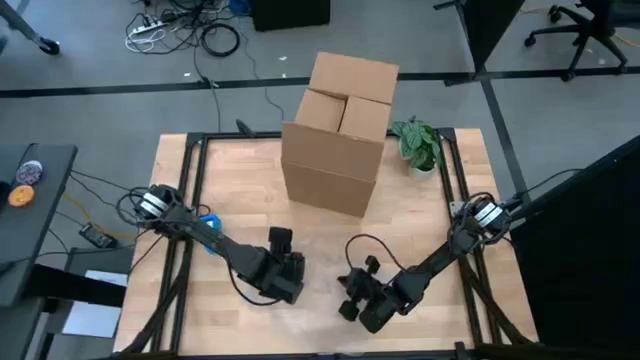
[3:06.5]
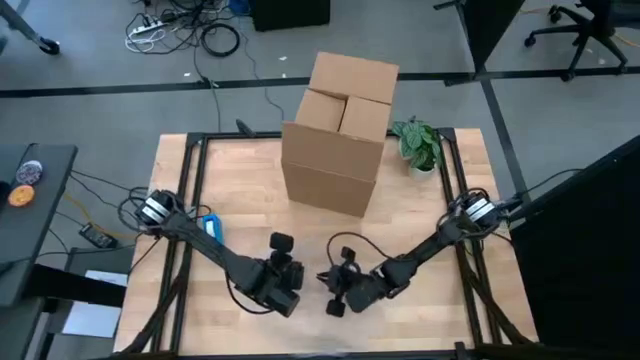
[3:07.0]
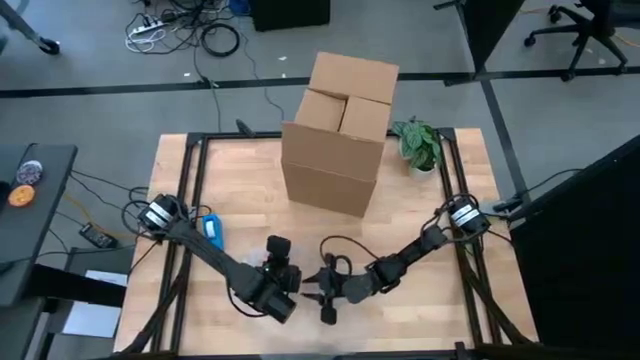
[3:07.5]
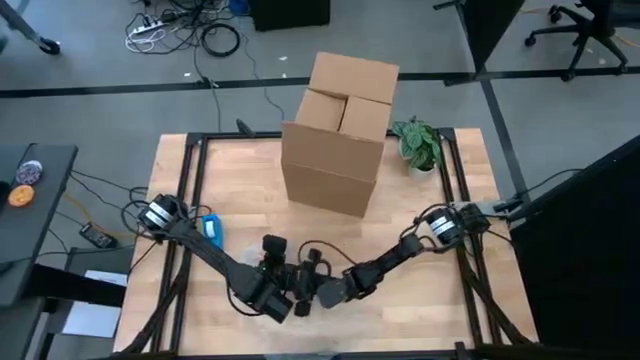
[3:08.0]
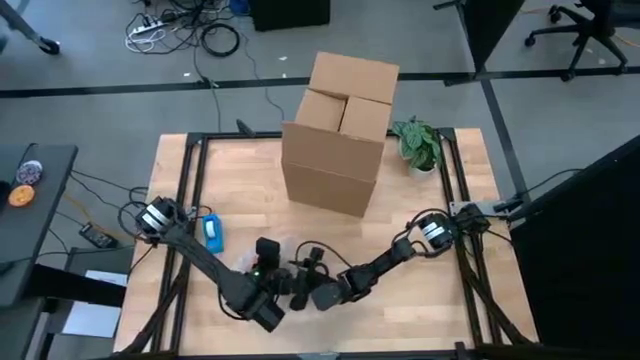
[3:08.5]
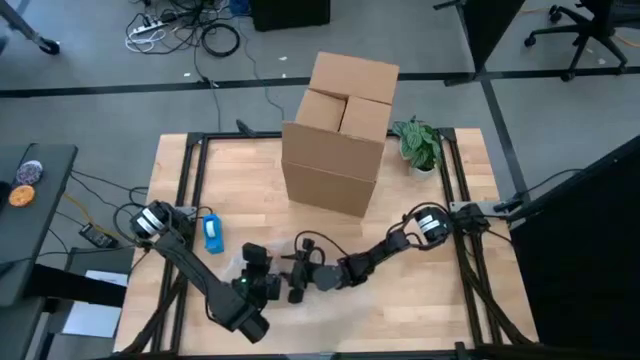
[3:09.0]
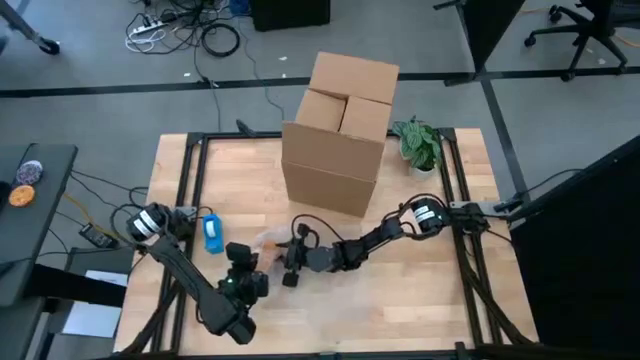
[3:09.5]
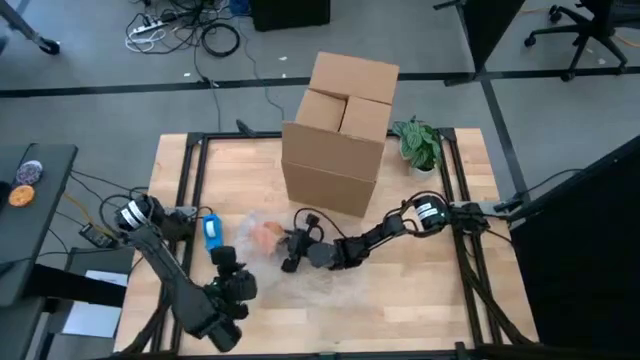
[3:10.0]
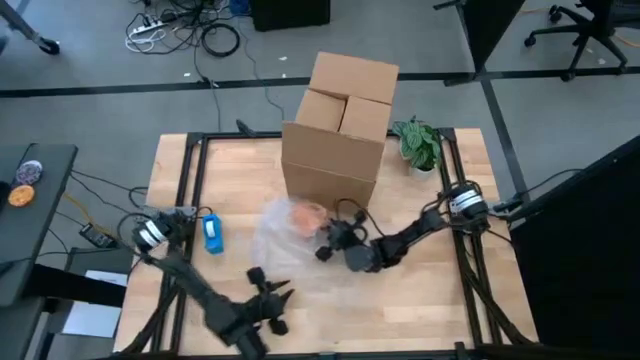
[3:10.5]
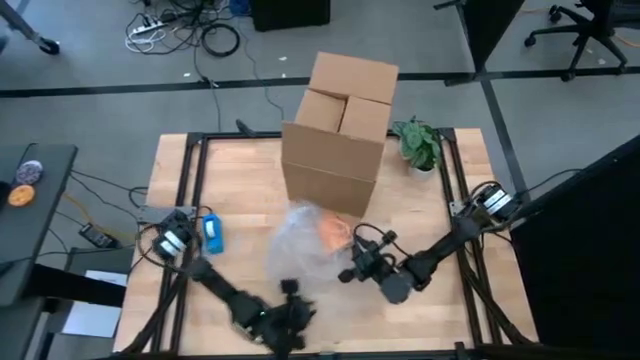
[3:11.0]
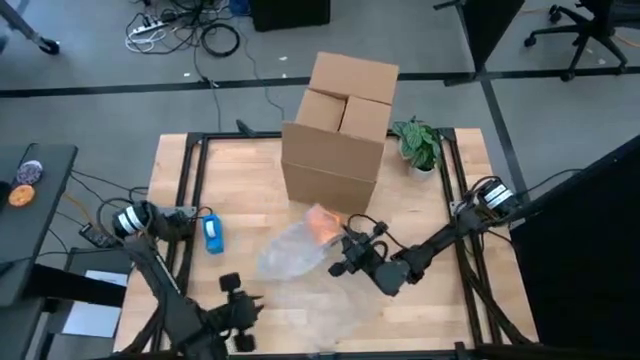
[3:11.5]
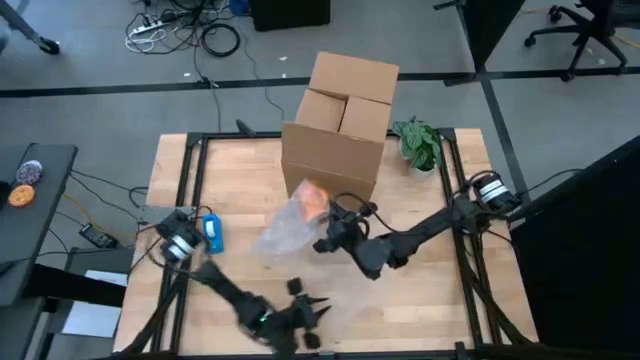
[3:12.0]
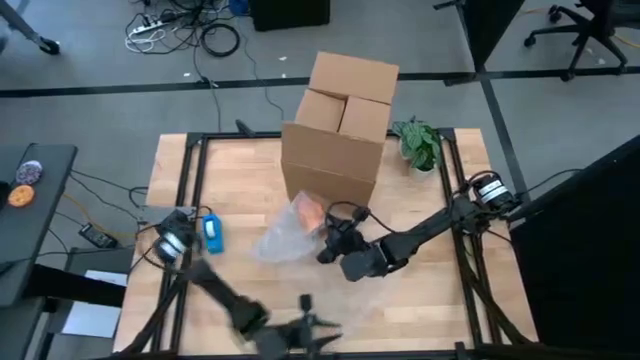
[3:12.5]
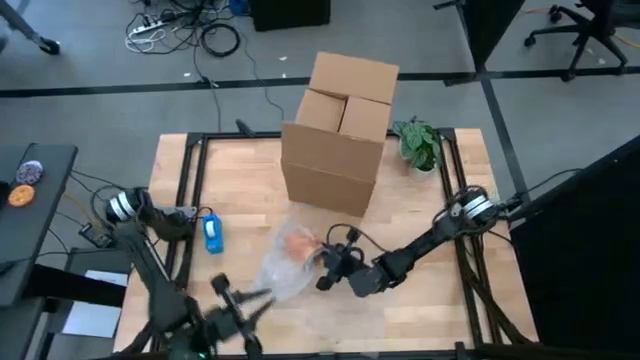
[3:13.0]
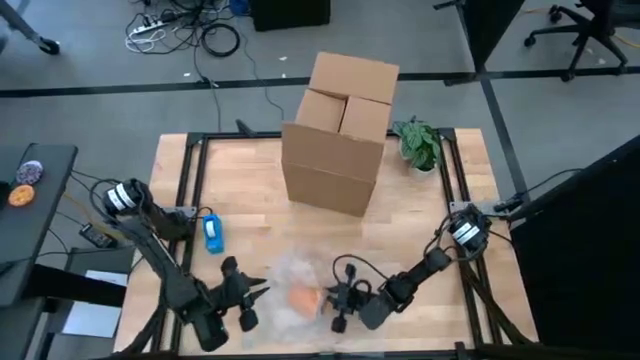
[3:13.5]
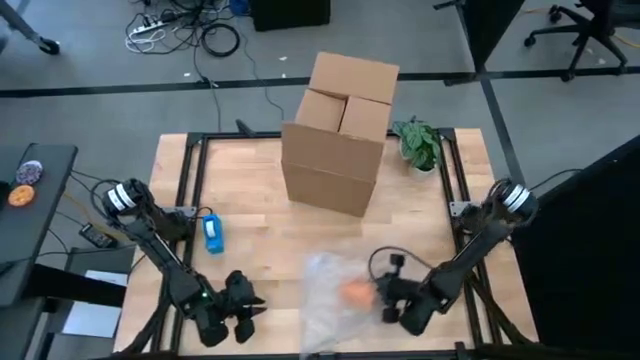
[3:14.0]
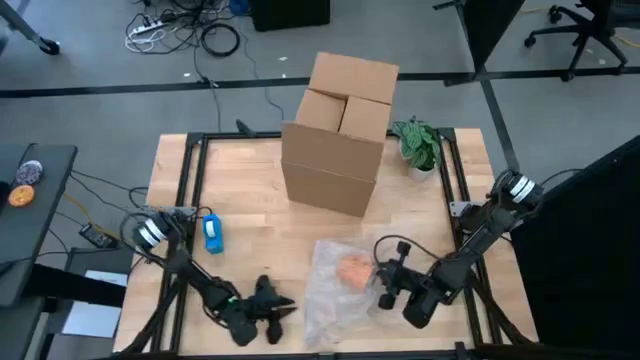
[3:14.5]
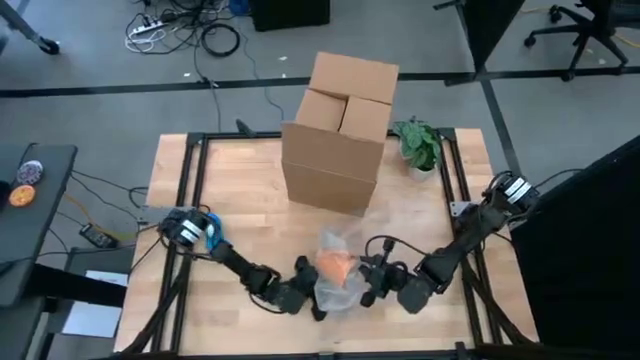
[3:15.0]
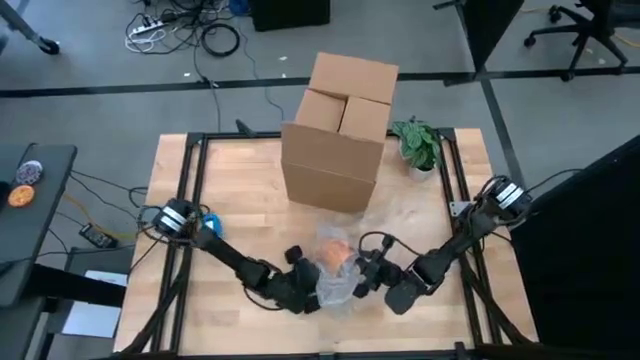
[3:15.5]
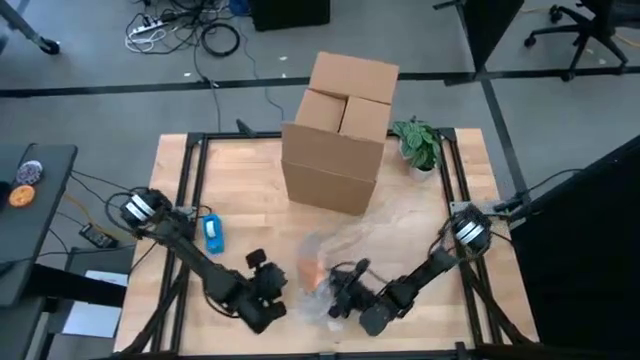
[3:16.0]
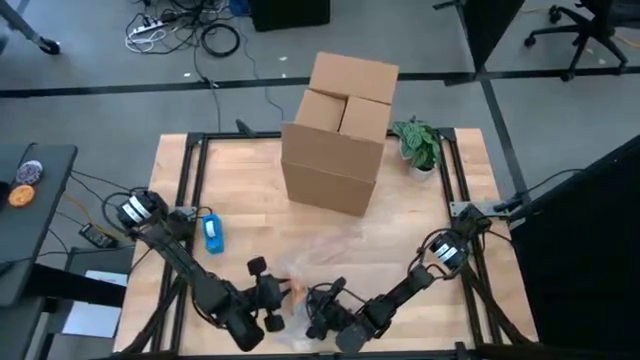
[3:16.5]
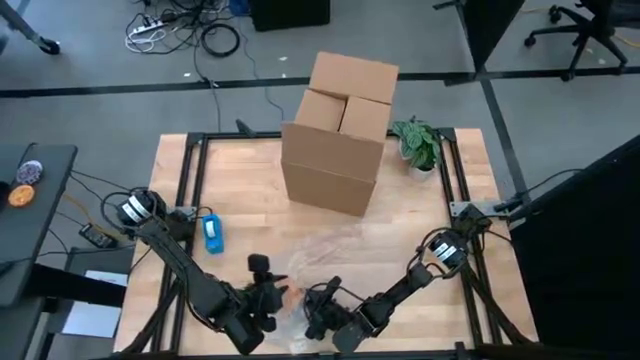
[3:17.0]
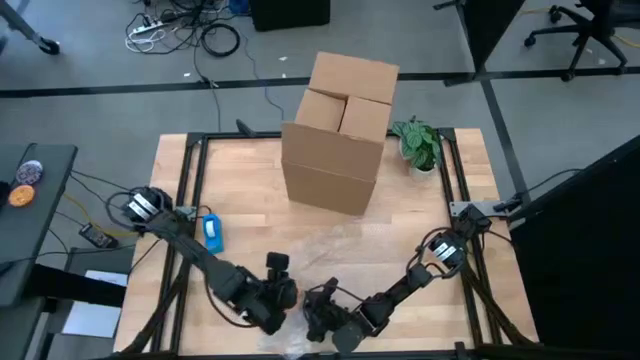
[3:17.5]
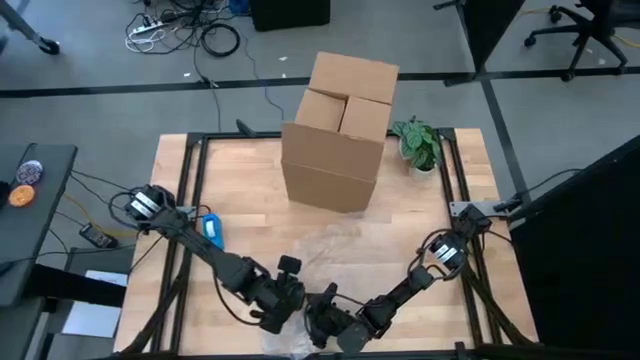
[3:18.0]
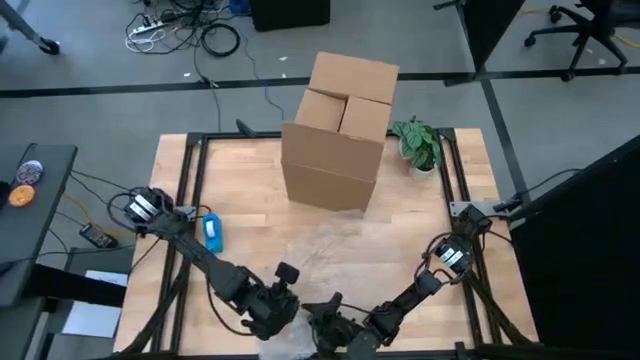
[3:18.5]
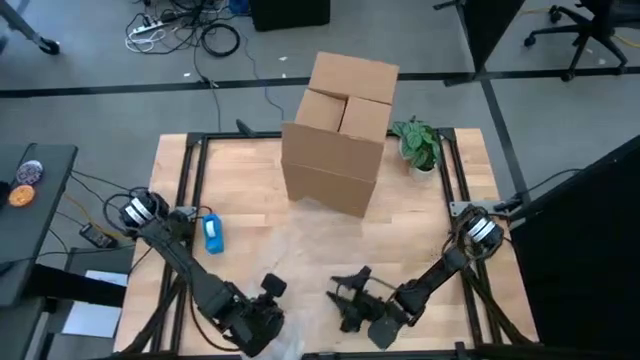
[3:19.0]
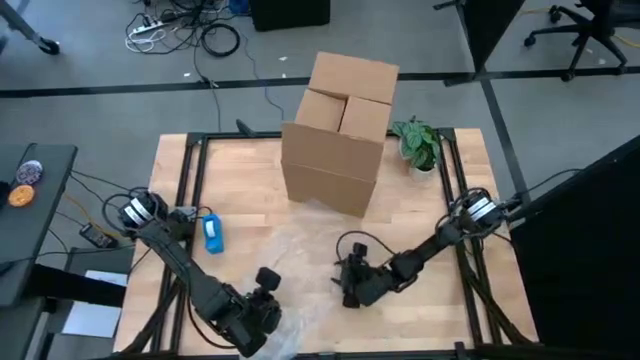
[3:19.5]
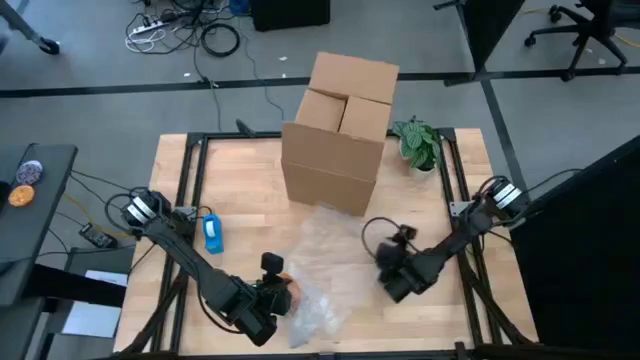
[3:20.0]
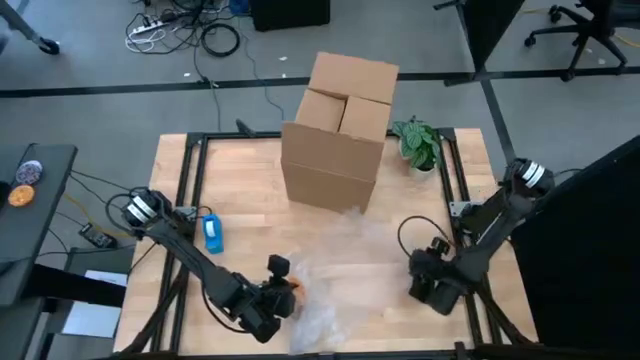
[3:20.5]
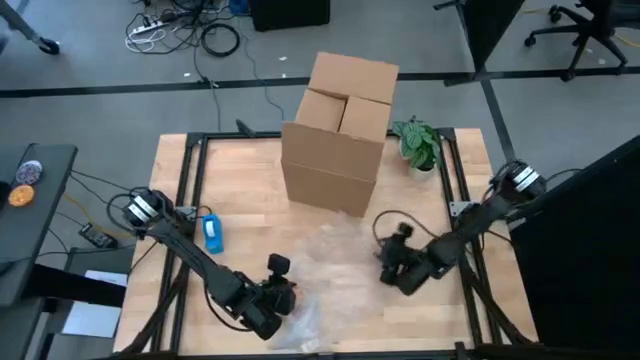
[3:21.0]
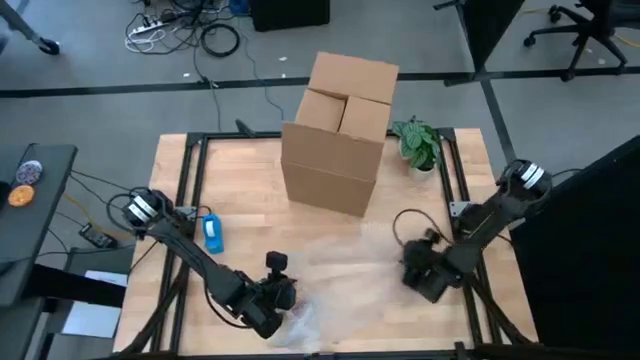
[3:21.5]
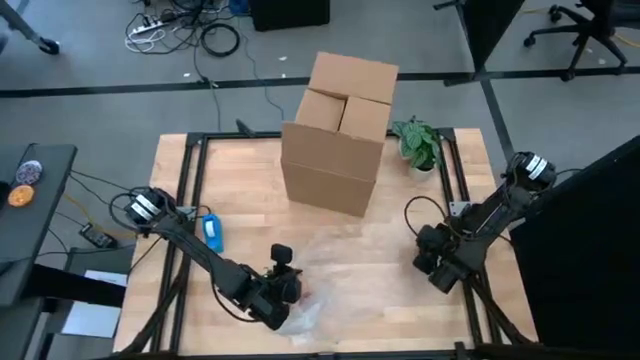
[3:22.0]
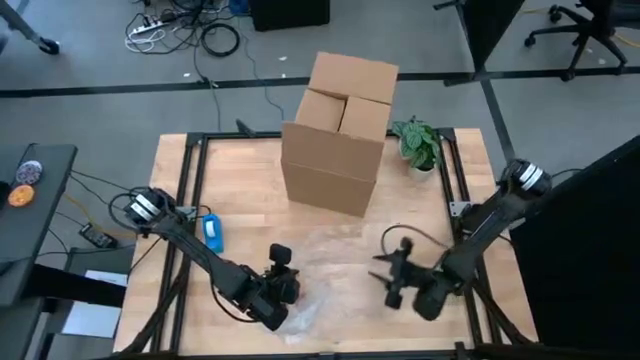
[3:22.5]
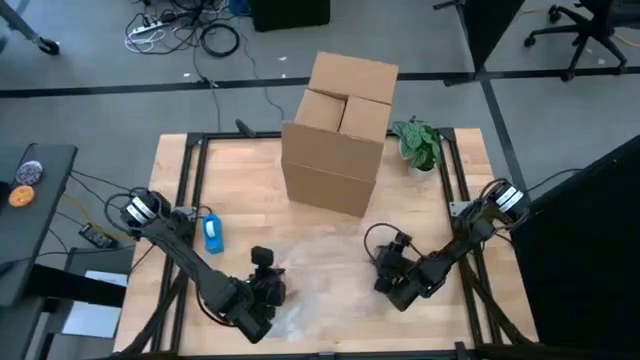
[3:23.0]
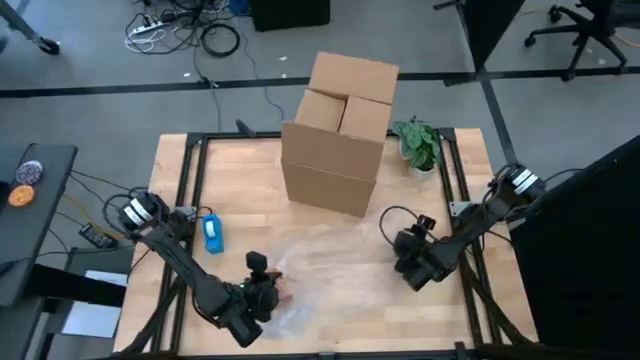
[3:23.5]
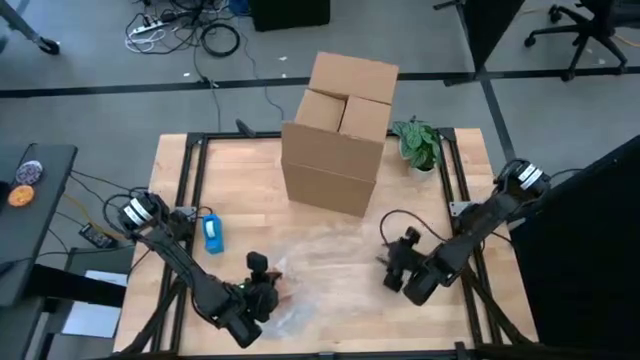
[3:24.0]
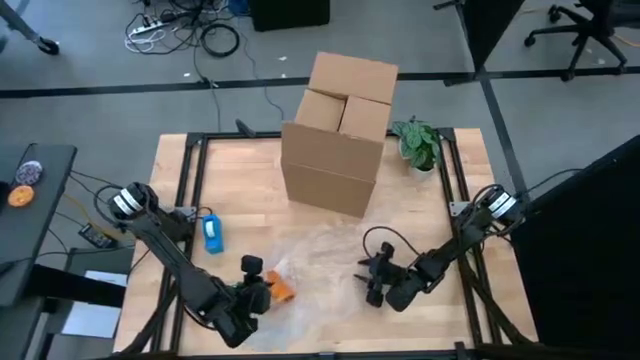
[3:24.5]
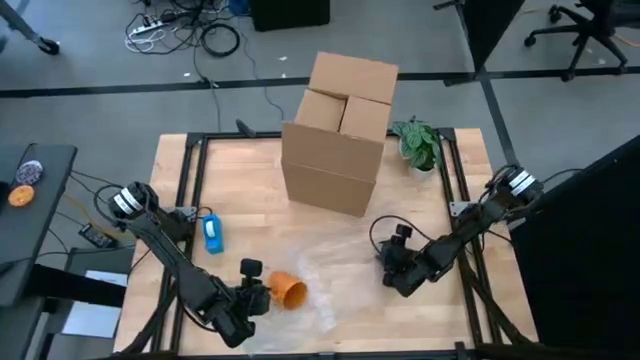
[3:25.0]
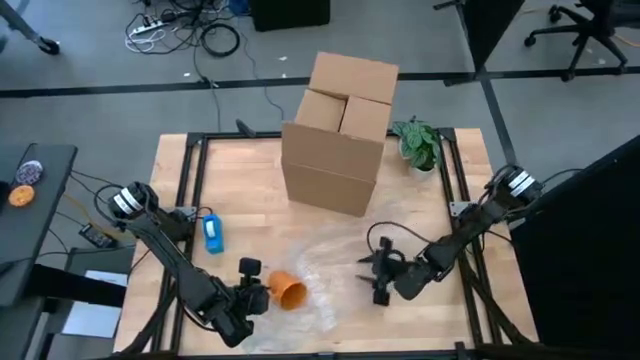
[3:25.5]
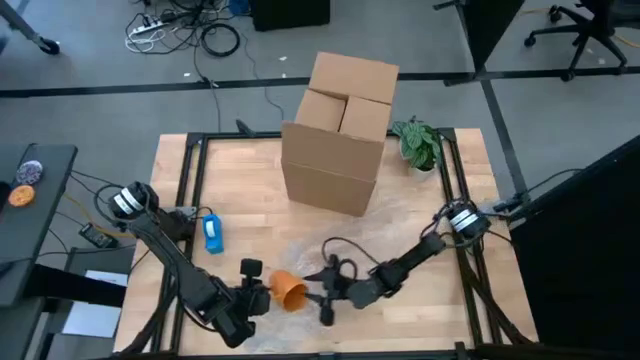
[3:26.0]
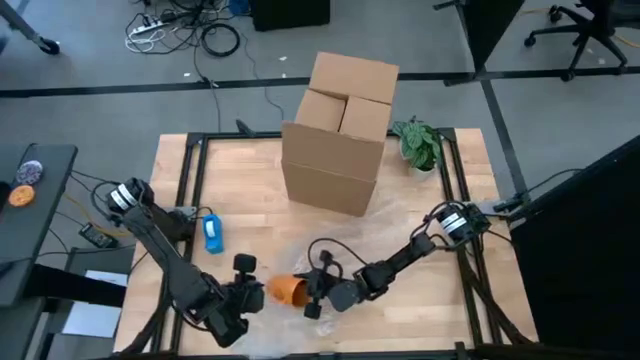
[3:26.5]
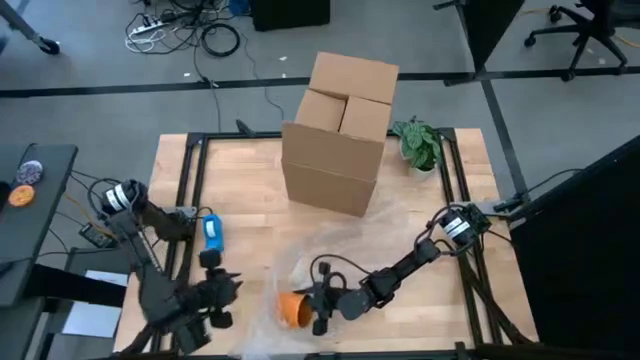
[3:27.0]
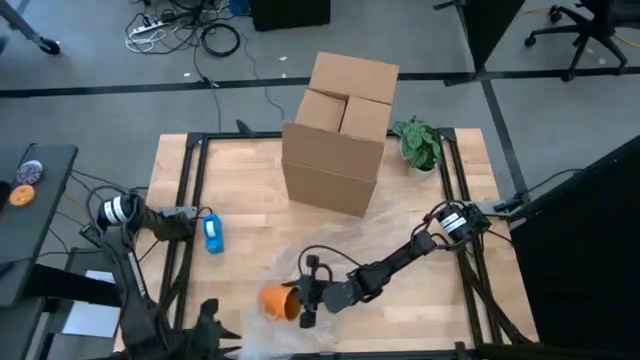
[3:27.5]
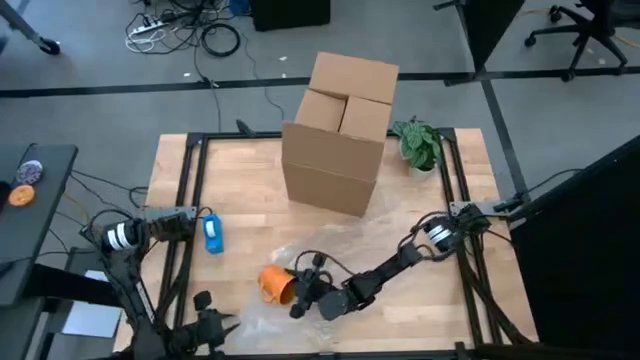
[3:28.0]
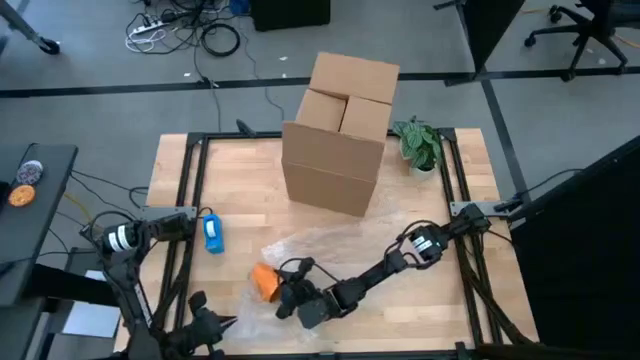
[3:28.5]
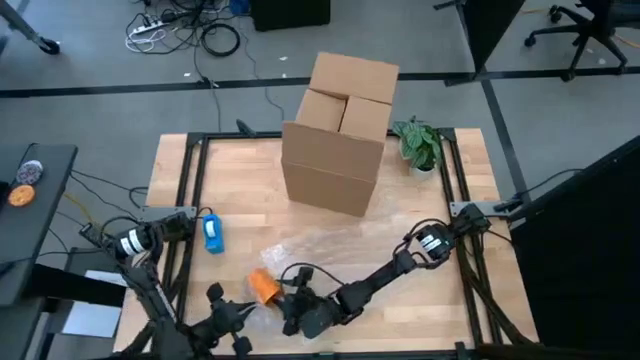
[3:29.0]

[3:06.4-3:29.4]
Task: wrap mug
Wrap the orange mug using the transparent bubble wrap
